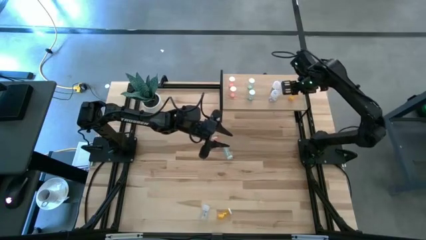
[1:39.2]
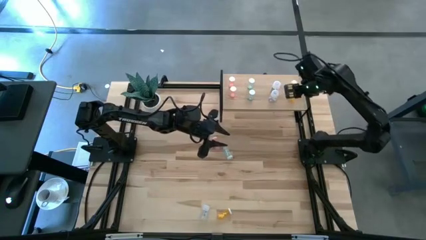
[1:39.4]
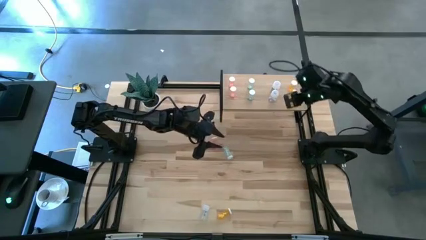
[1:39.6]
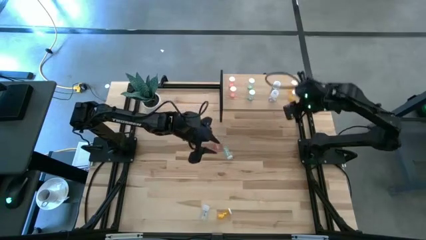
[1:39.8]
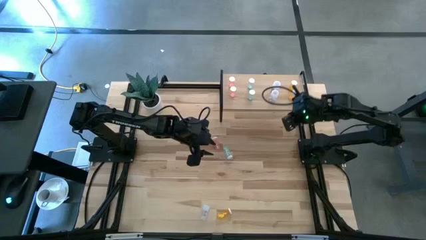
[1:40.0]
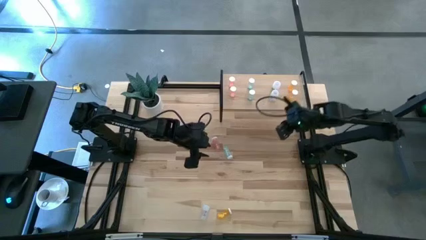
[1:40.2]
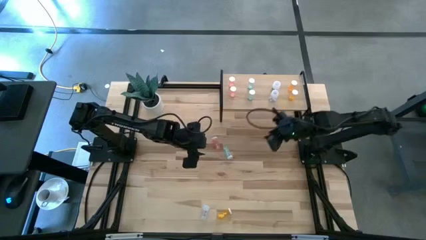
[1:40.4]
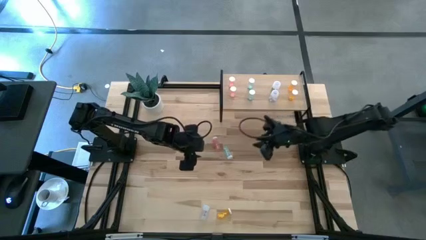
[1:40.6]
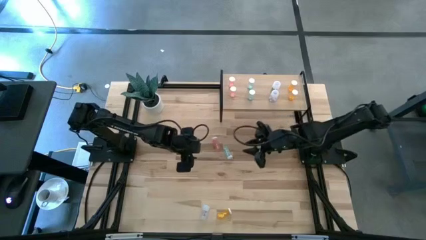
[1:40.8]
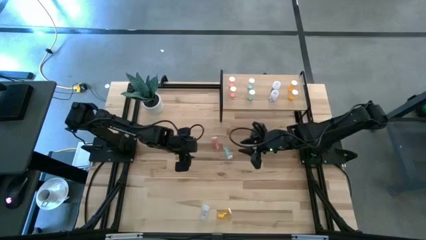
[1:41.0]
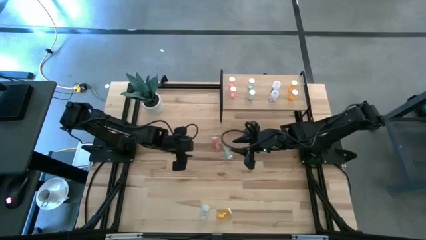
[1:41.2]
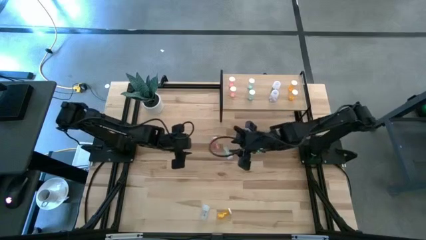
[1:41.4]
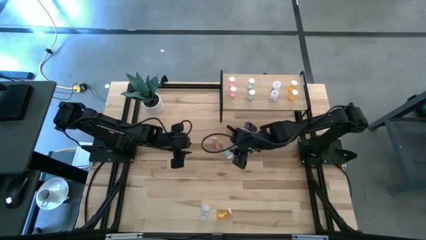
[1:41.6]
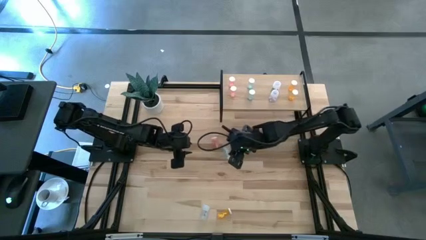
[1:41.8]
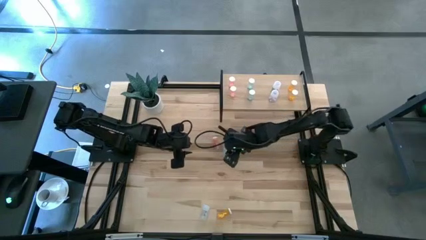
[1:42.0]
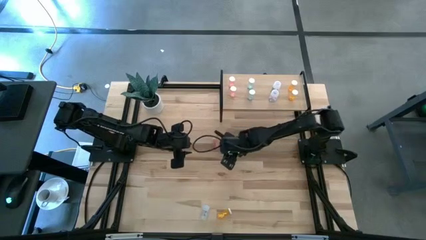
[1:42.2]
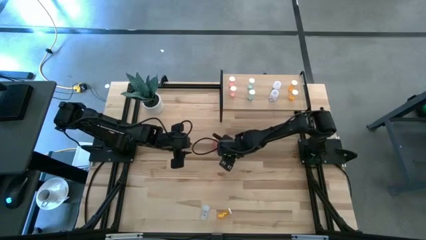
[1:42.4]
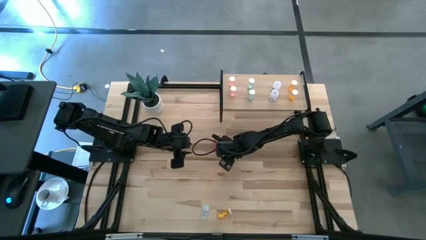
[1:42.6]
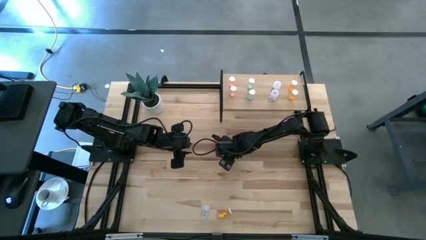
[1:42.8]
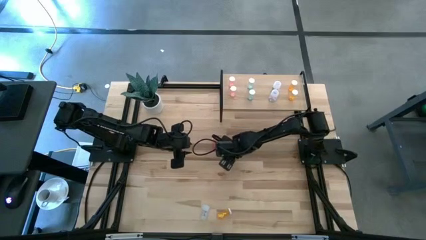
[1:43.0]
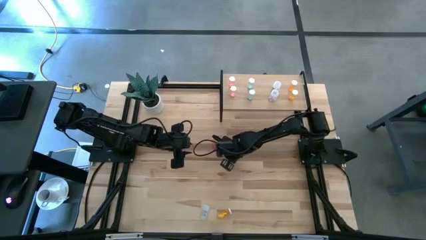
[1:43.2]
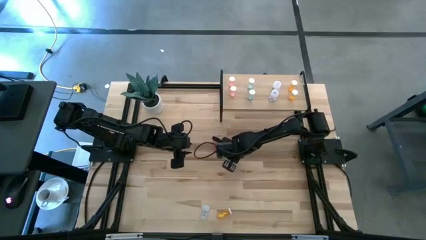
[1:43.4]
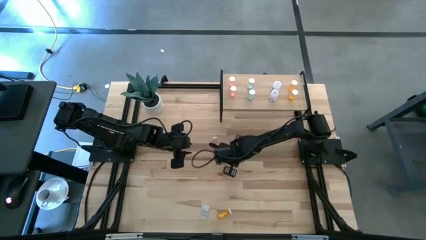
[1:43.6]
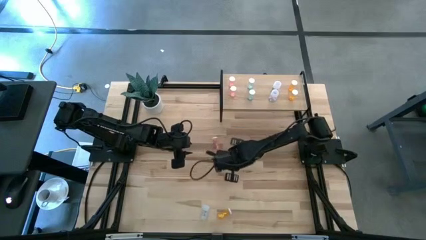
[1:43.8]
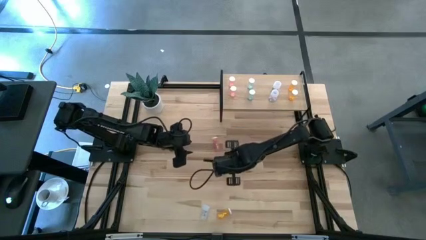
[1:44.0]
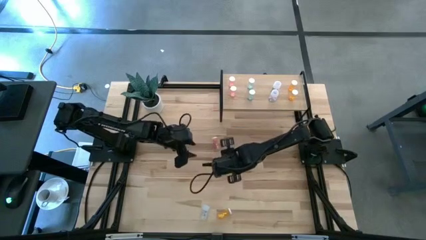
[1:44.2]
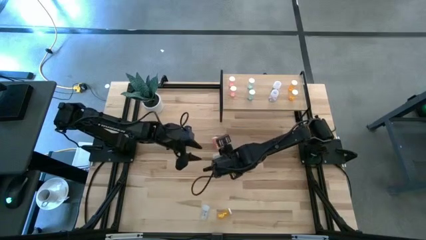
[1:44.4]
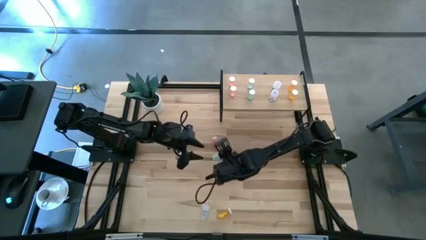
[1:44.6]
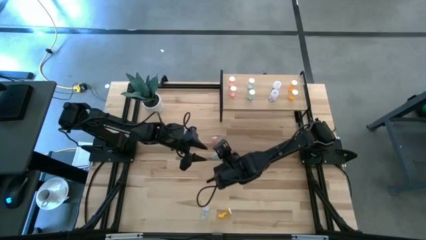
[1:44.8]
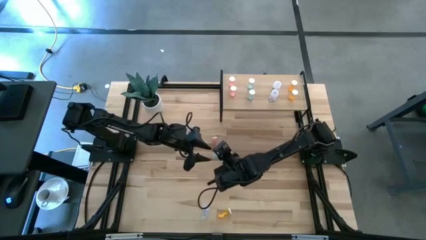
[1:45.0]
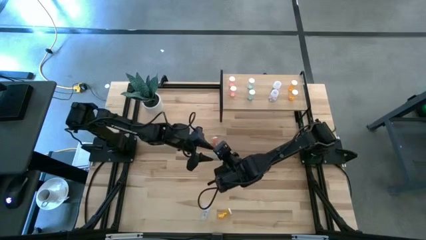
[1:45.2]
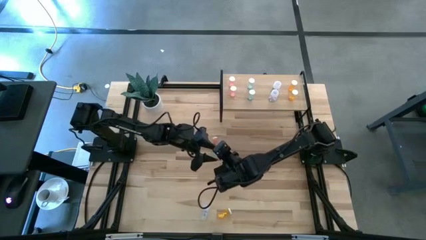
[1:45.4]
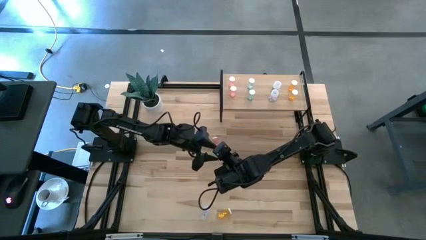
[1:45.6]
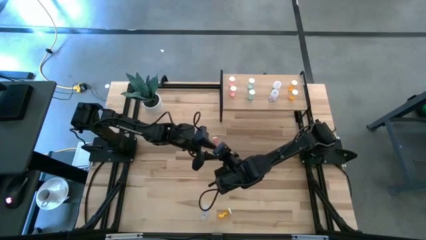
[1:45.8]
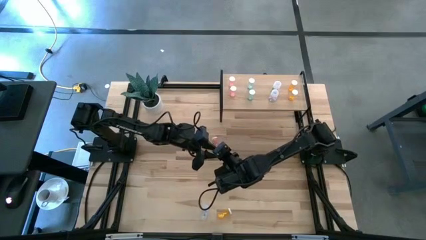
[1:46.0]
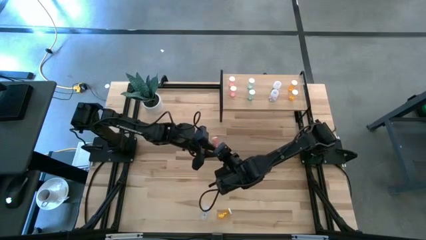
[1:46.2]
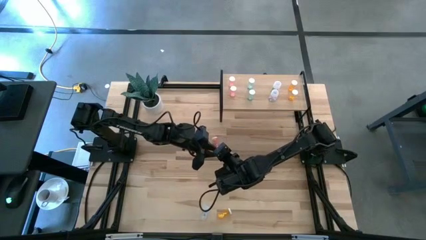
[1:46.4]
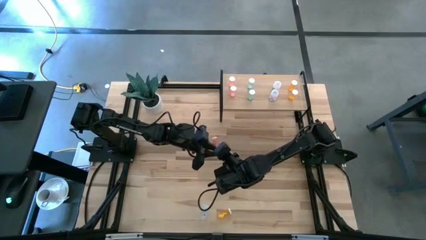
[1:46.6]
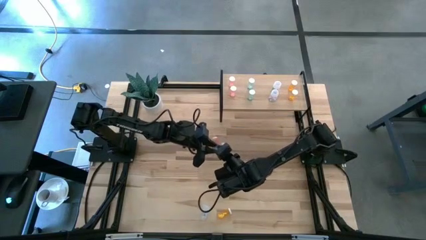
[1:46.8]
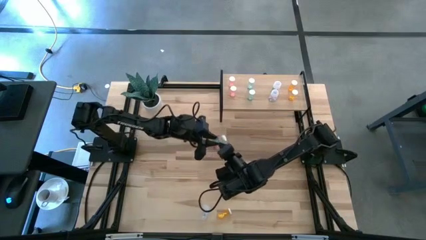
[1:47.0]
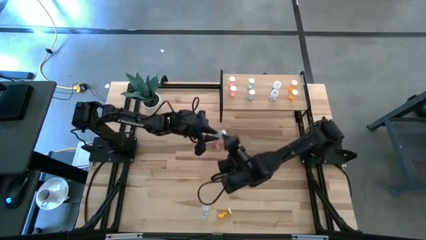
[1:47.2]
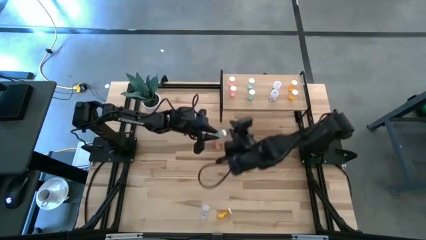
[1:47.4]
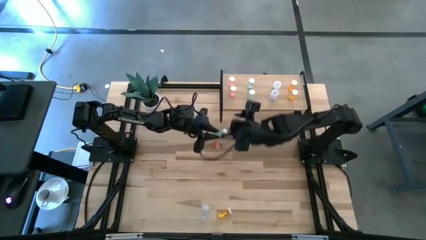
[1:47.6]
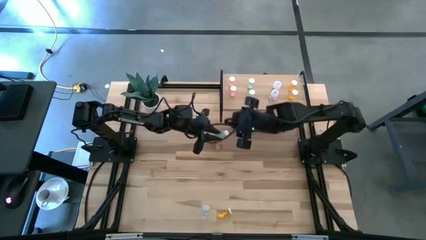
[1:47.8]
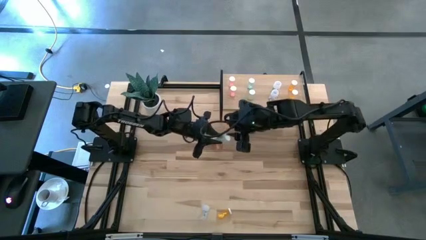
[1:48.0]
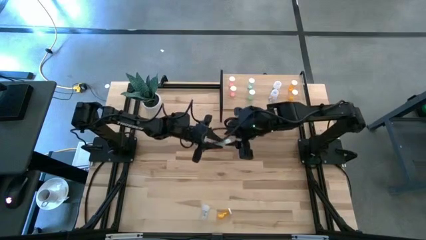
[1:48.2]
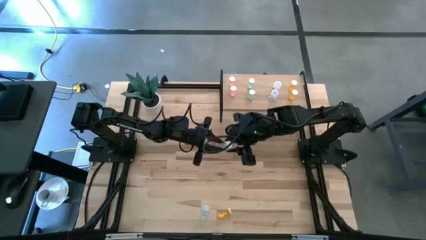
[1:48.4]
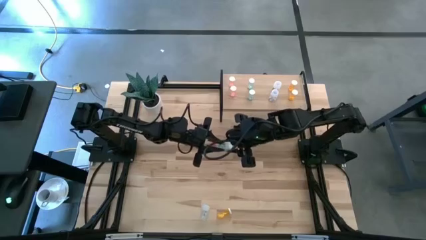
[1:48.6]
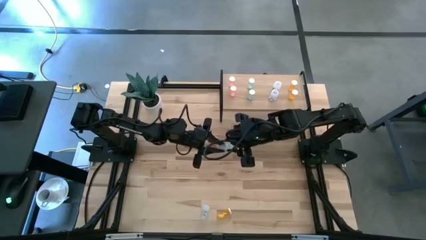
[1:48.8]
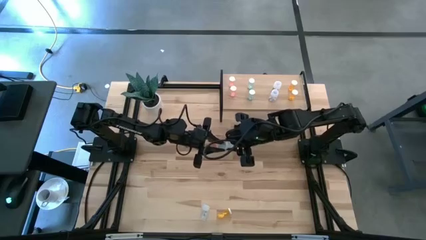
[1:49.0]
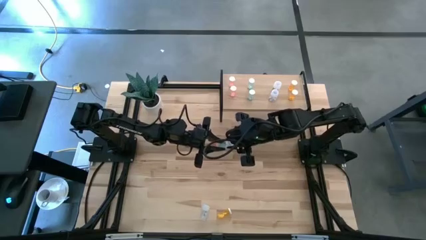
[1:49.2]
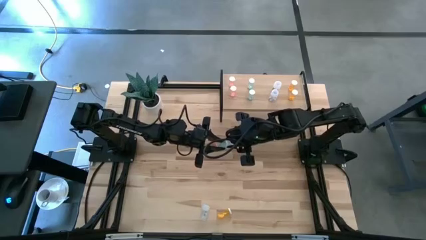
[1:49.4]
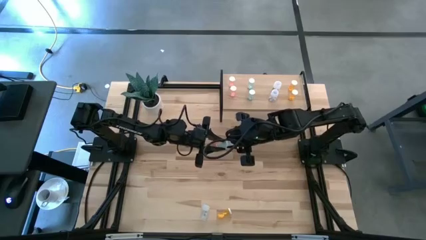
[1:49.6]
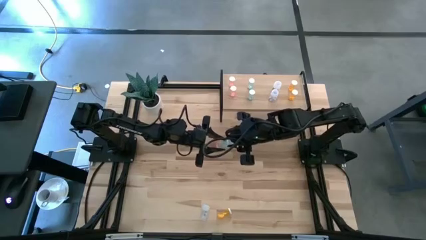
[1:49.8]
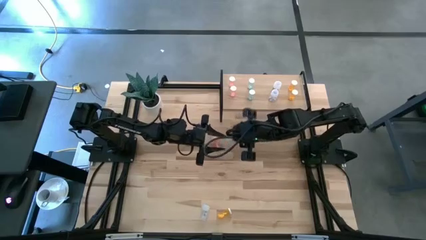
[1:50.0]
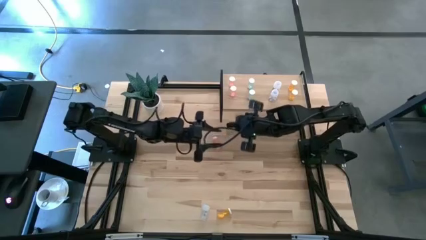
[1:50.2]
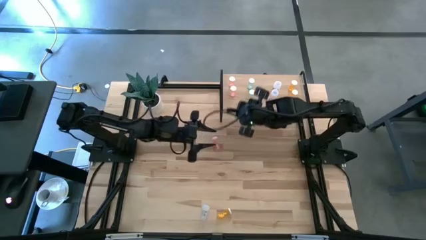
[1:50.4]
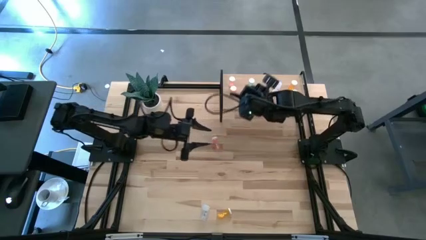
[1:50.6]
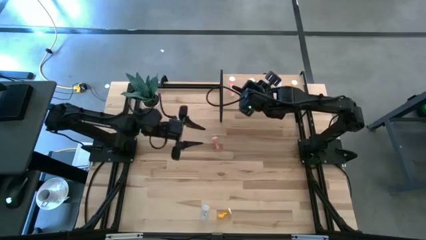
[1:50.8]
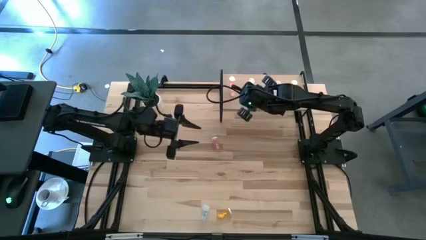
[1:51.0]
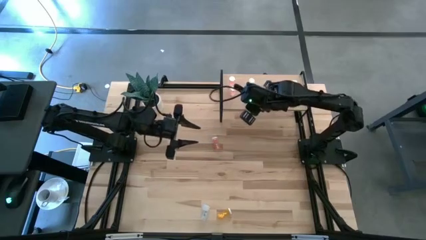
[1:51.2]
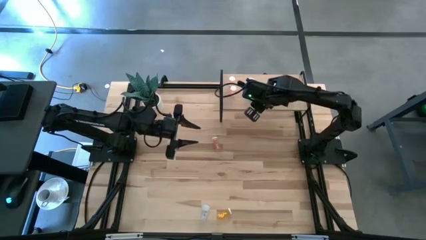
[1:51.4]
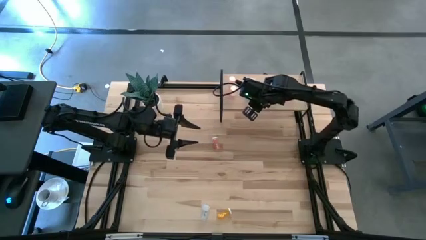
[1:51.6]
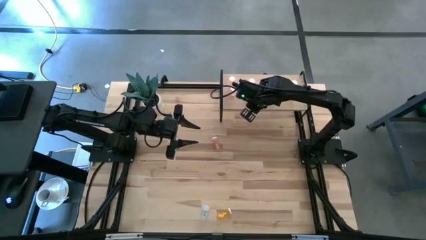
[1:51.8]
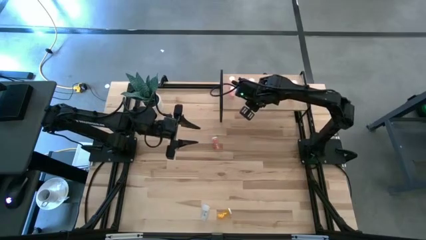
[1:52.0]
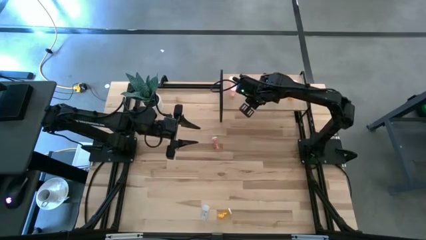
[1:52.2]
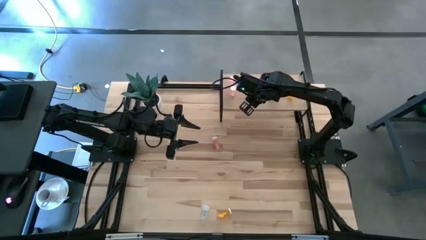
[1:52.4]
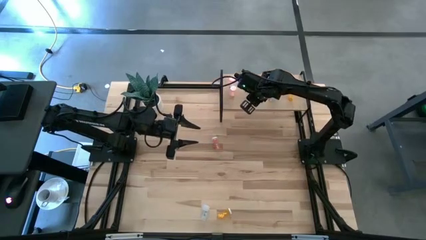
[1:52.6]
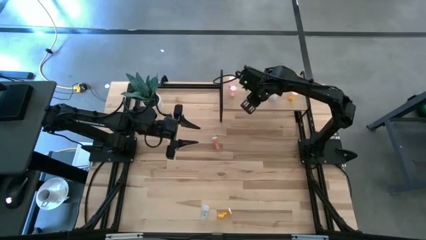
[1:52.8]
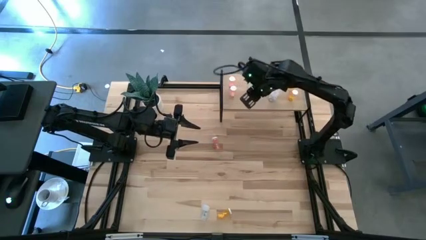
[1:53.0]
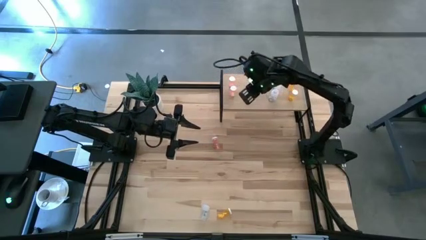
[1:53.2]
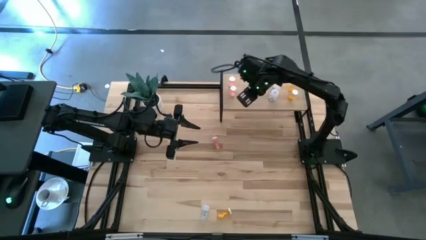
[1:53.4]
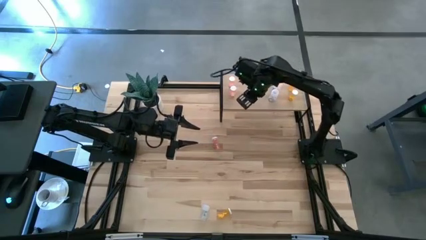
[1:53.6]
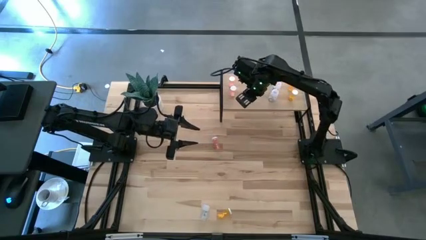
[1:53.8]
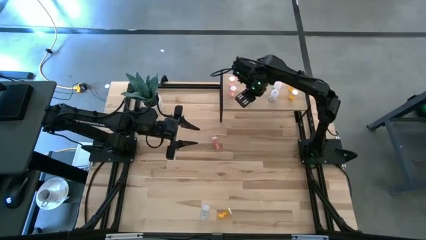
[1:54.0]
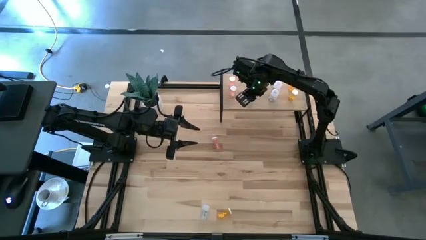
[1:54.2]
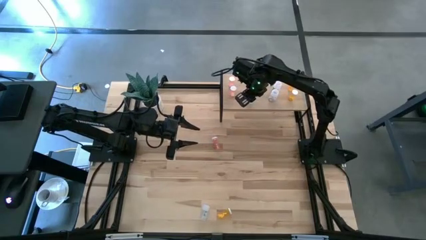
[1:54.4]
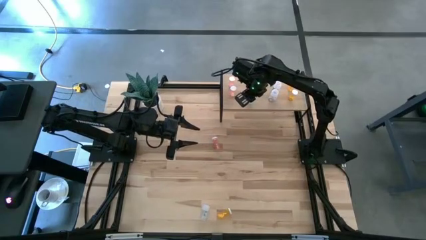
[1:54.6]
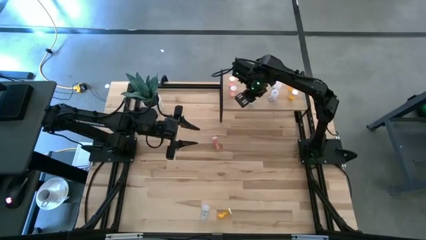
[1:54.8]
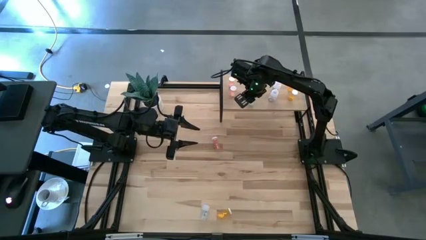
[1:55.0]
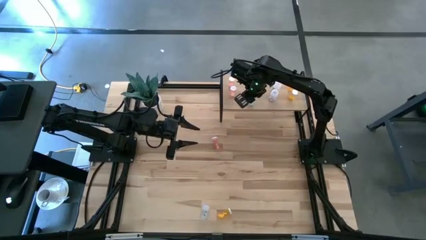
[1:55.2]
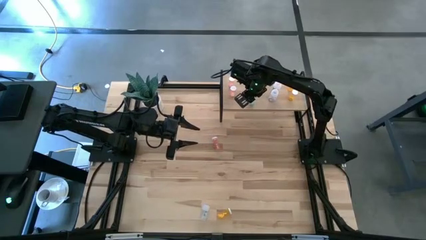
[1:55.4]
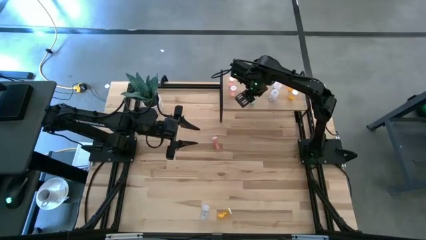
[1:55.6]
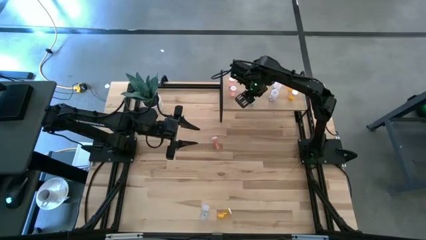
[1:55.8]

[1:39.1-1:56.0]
Task: Pick and place medicine bottles onto shelf by color
Put the green pill bottle on the shelf aligned with the other green pill bottles
